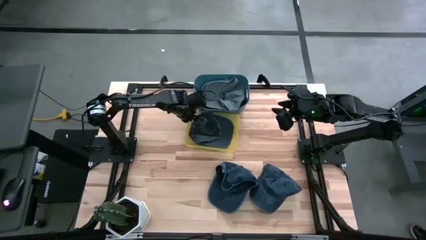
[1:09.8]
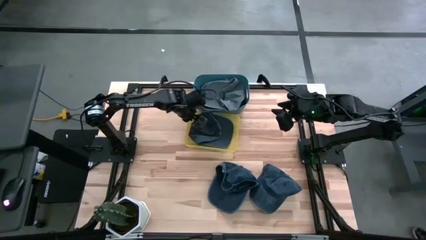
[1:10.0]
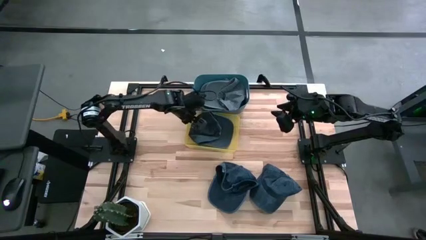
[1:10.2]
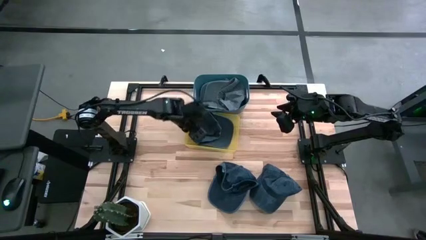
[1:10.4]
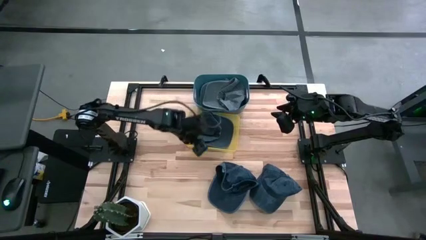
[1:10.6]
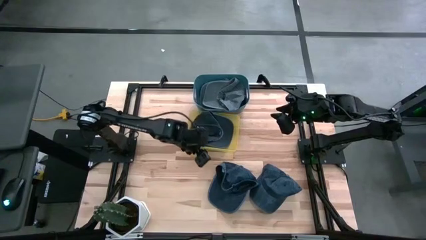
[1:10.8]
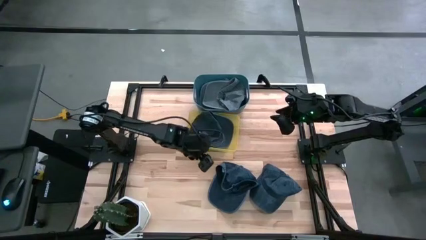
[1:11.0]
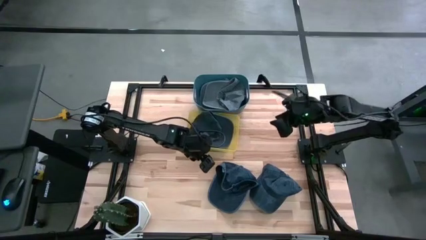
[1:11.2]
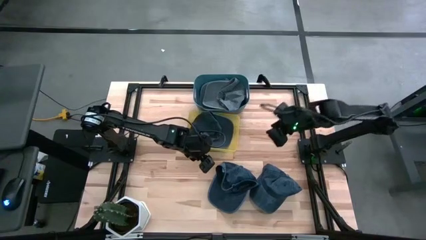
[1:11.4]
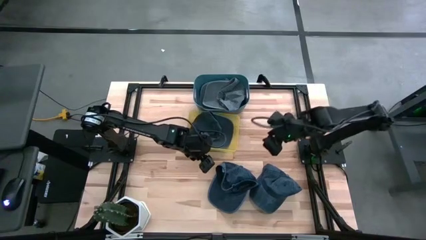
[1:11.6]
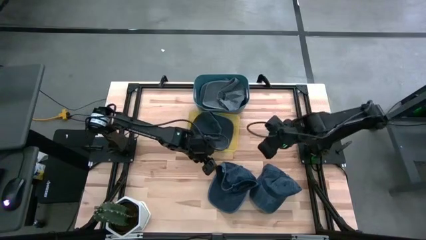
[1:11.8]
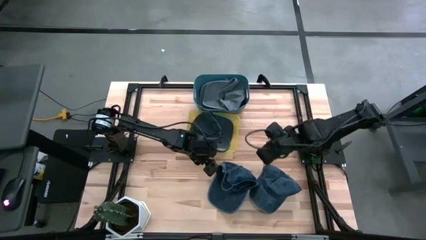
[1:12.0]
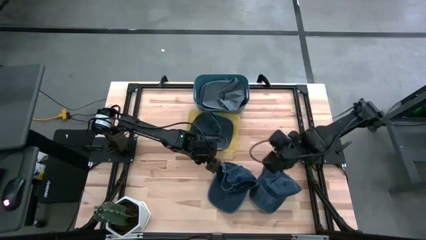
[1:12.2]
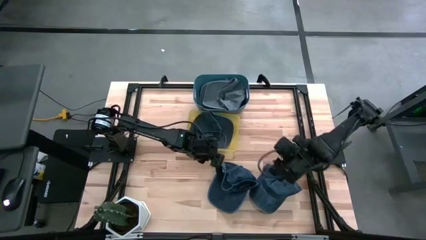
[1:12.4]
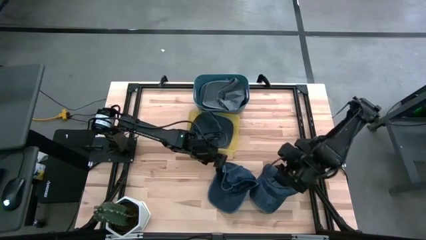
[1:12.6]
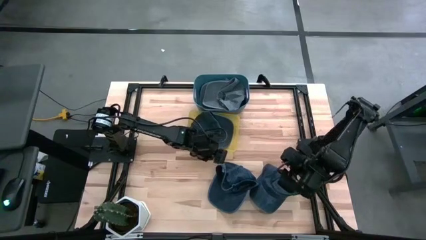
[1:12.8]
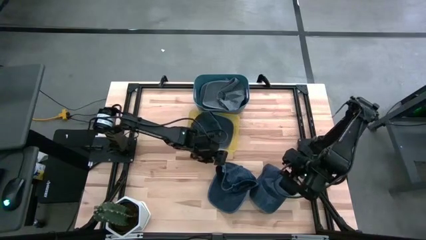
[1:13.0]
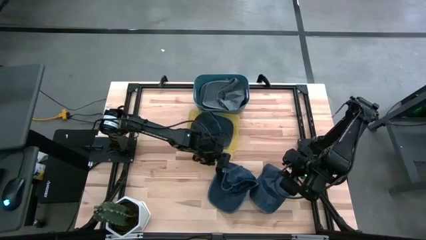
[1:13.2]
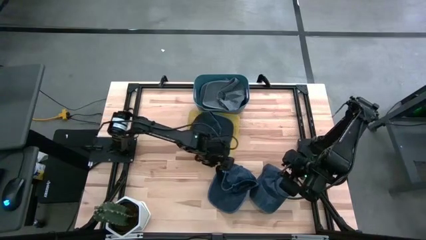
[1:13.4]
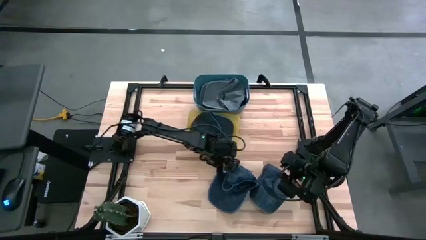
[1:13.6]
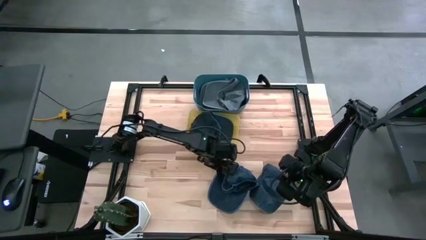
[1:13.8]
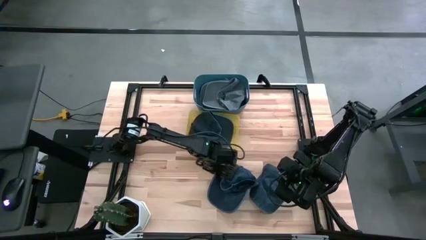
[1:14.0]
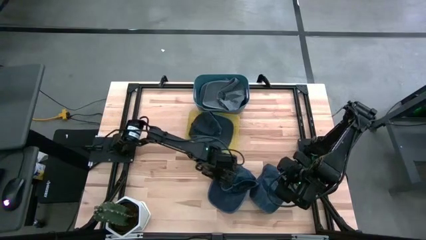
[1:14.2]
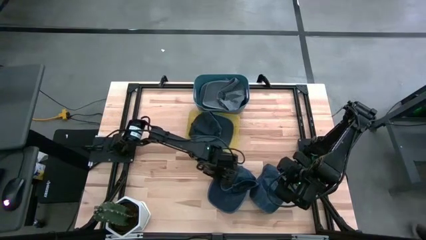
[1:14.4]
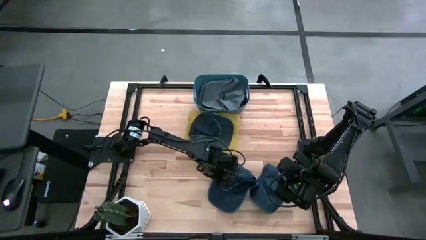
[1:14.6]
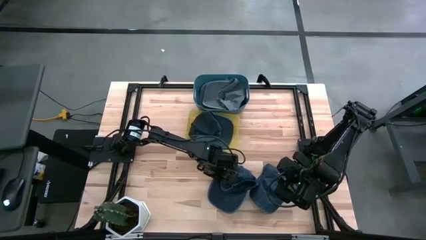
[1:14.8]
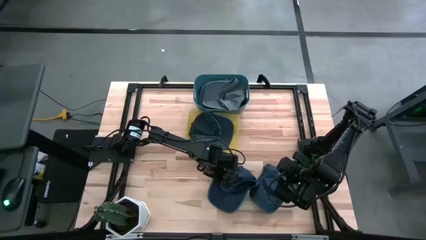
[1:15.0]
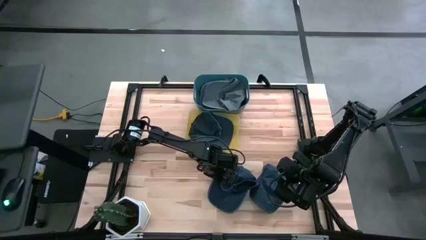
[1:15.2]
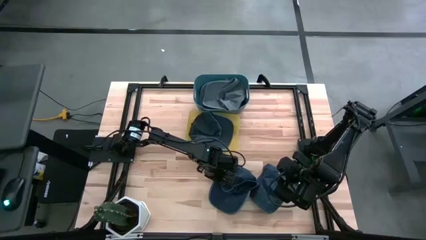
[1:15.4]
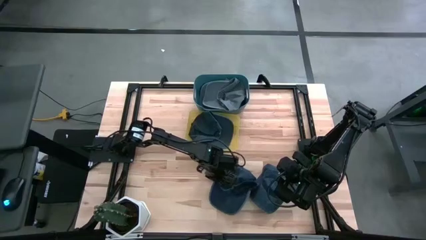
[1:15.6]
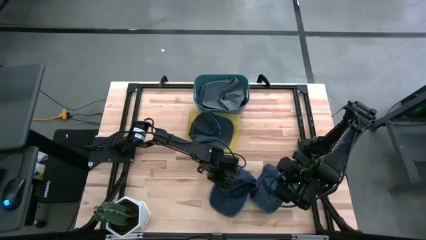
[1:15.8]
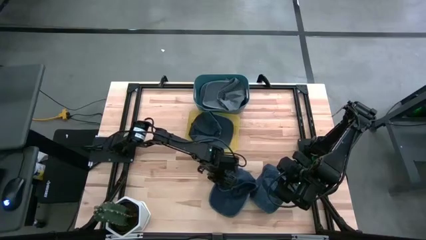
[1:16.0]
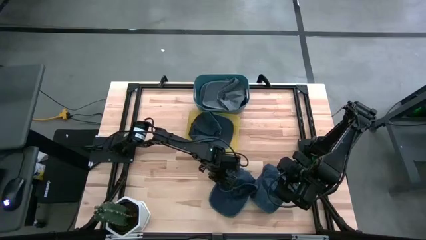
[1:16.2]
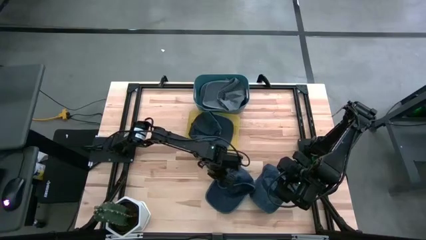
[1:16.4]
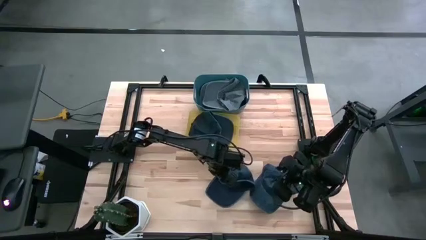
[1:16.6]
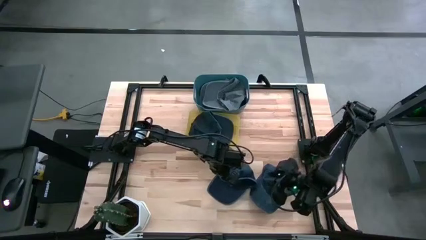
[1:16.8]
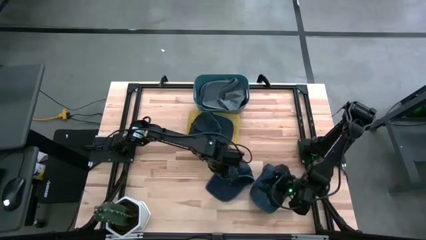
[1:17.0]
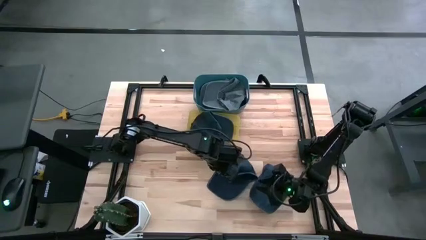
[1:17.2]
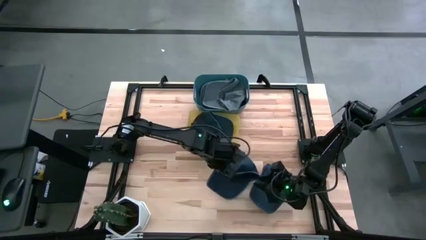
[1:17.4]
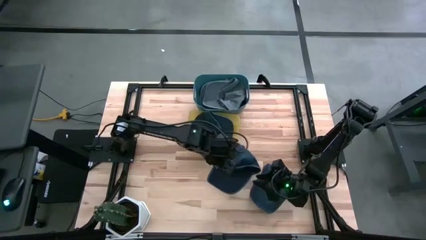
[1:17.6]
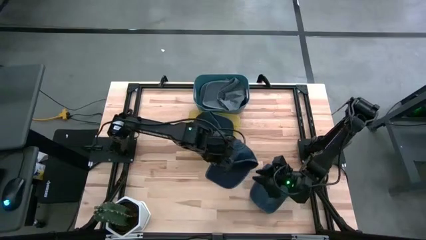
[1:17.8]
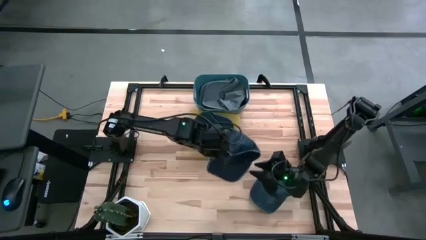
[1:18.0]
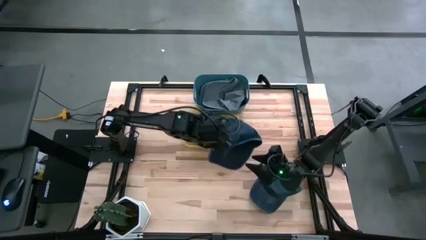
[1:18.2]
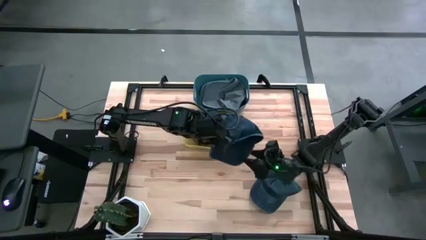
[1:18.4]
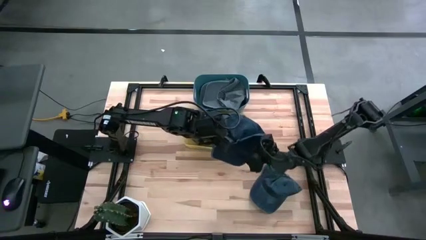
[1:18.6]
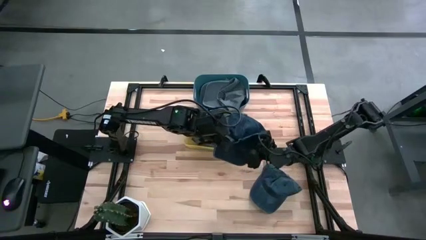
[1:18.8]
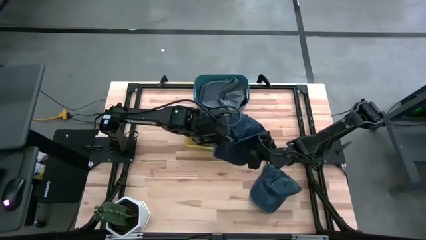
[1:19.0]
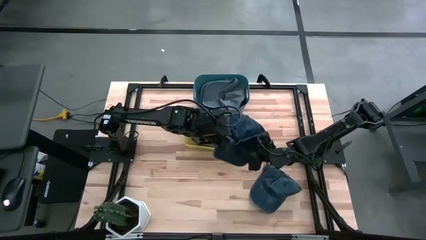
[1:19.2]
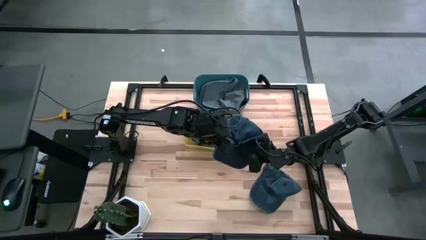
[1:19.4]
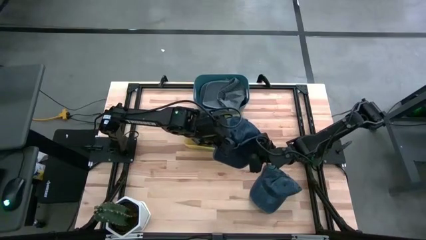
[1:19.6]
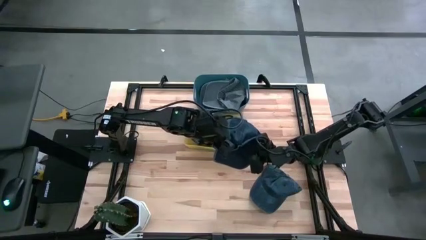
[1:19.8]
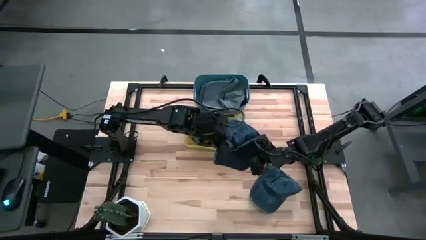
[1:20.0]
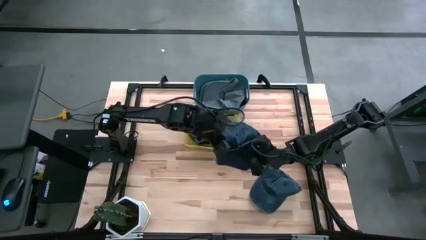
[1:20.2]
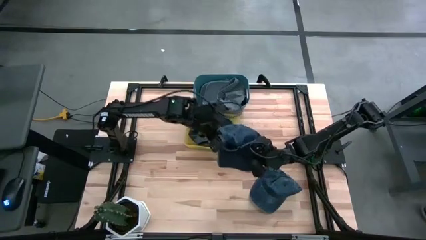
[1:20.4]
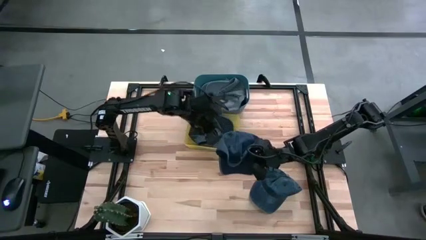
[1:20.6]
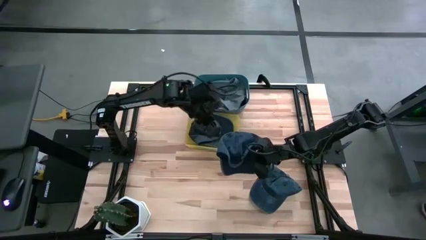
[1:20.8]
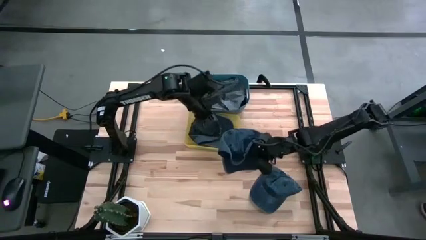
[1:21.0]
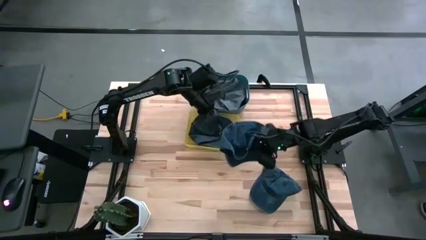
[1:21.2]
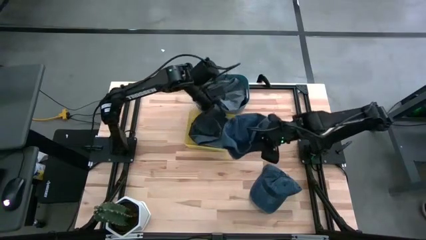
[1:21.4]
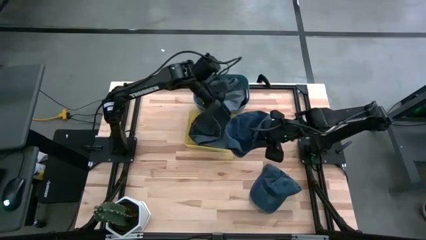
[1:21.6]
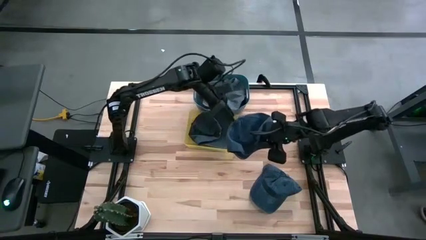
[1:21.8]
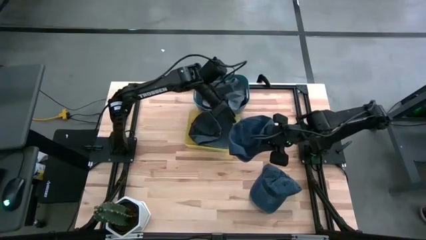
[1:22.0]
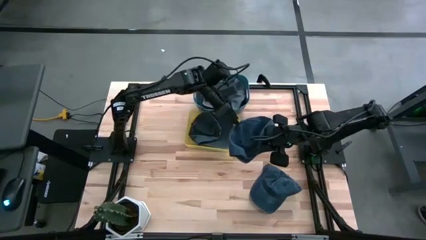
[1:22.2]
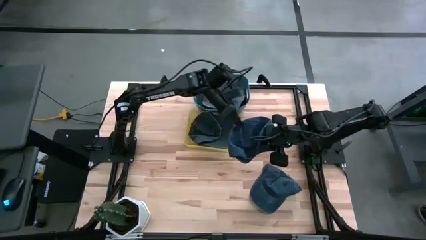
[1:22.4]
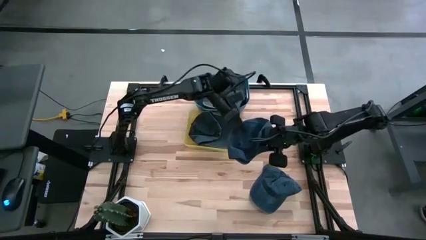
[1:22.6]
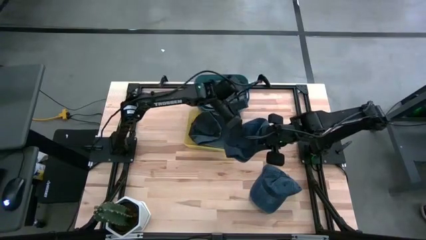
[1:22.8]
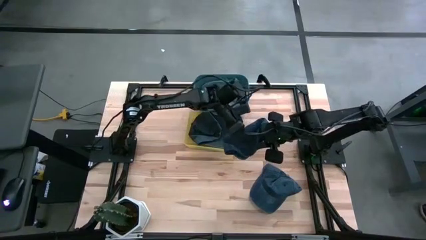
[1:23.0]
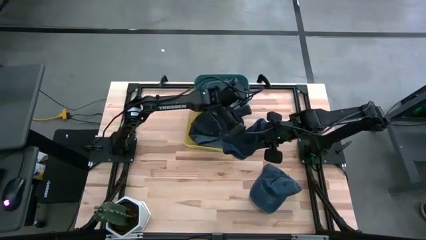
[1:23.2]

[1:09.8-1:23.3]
Task: Pick & Place hat
Put the left blue cap into the yellow bin
